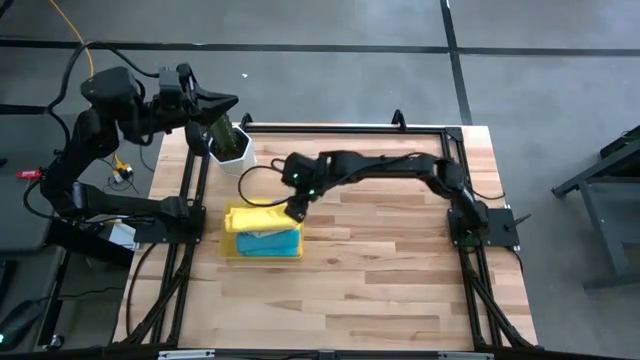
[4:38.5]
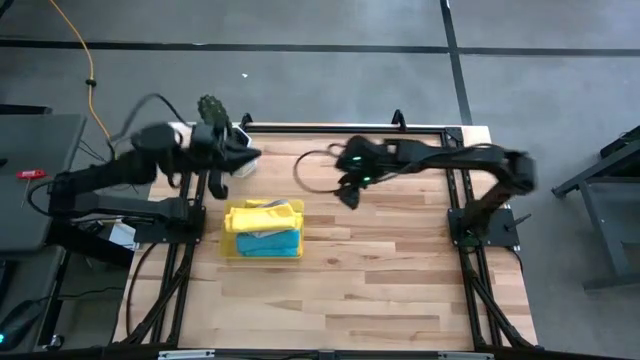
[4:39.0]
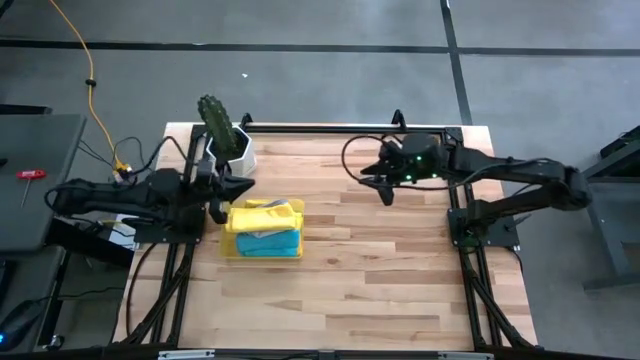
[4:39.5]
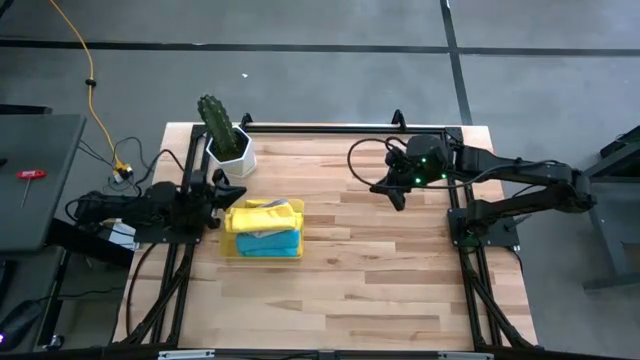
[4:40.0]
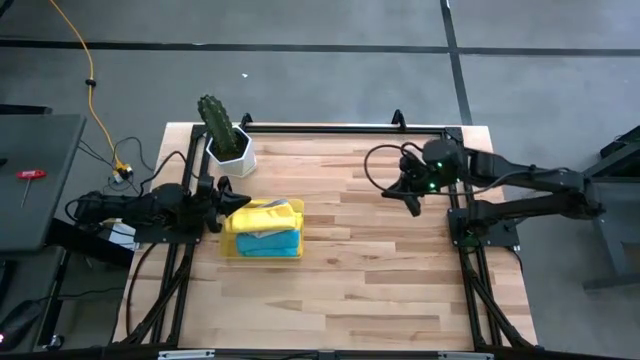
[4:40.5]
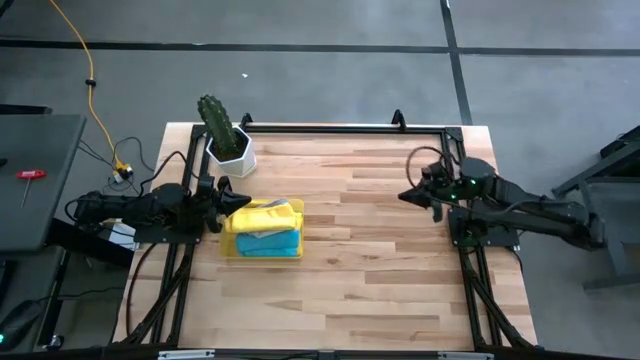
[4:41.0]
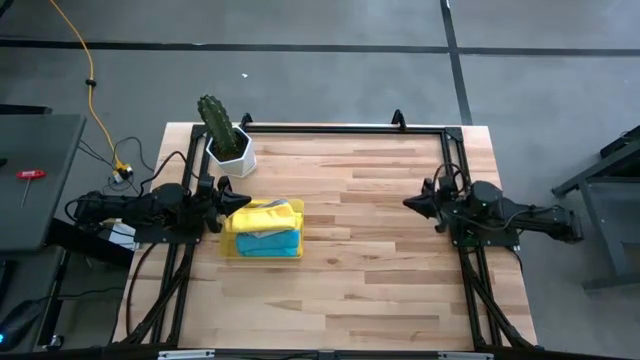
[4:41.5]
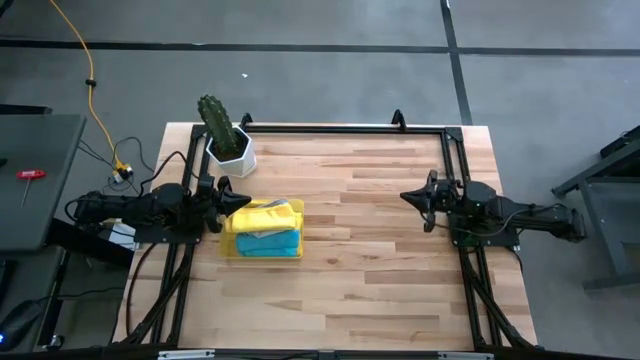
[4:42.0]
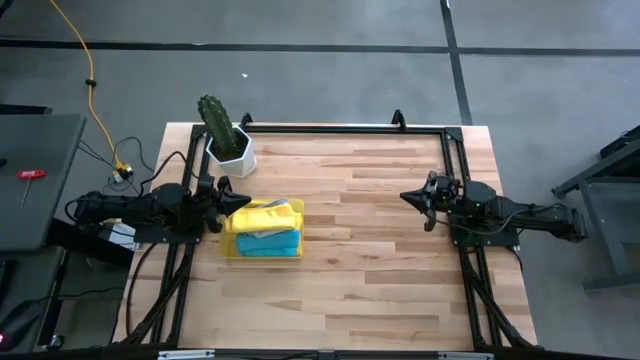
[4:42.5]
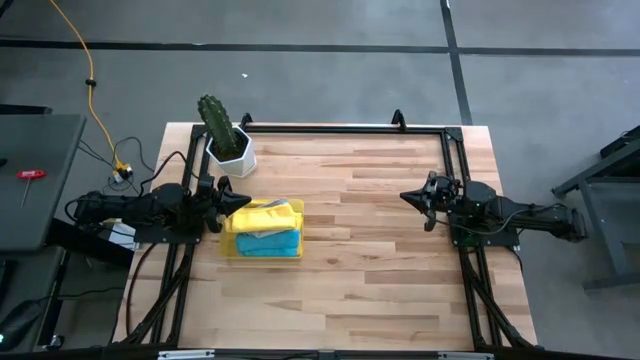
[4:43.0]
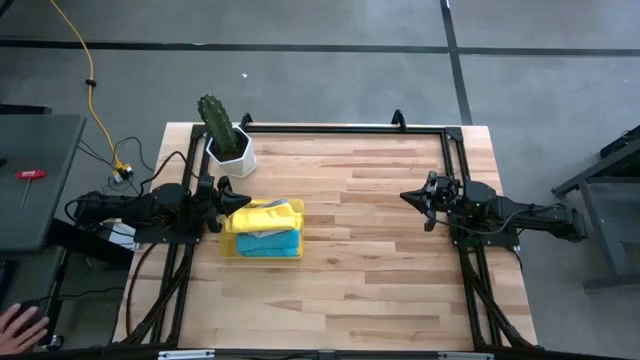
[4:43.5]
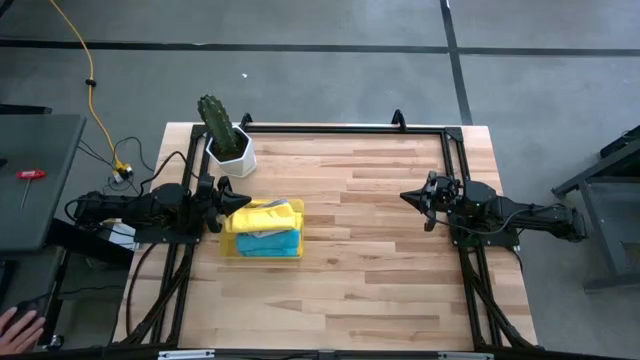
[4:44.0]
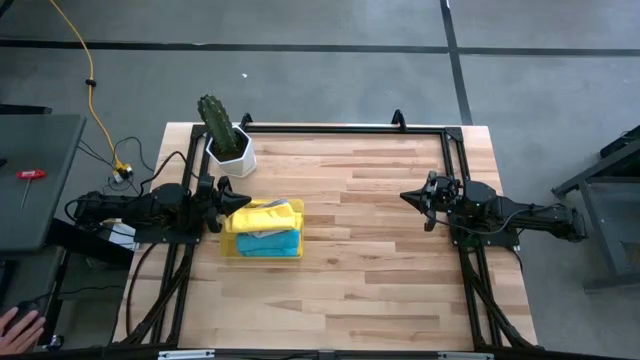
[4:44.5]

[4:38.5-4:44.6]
Task: Fold microfiber towels
Return To Home Position

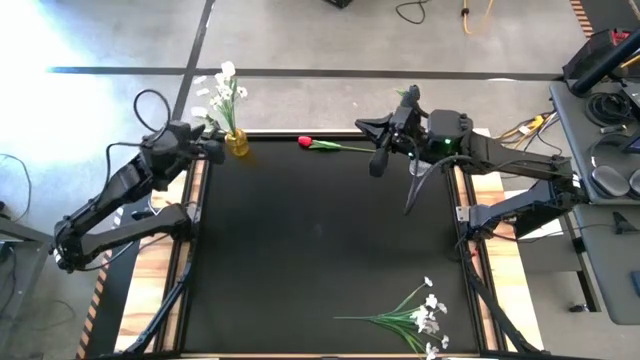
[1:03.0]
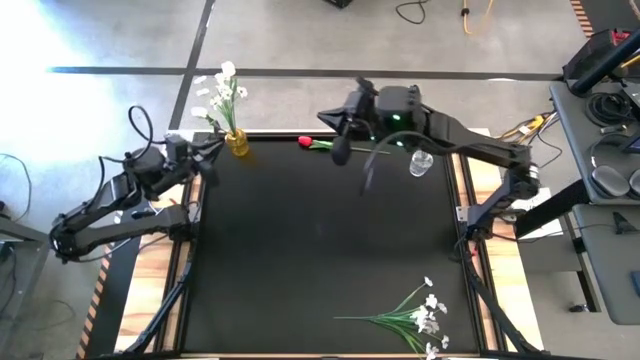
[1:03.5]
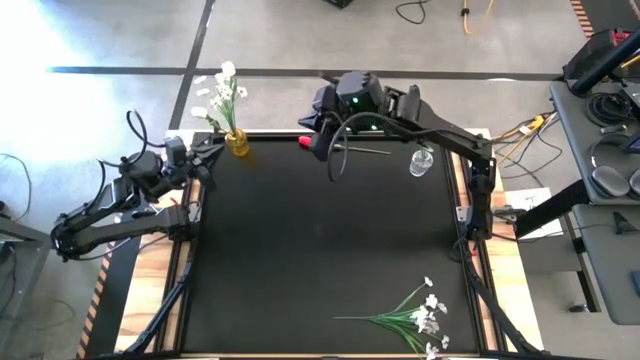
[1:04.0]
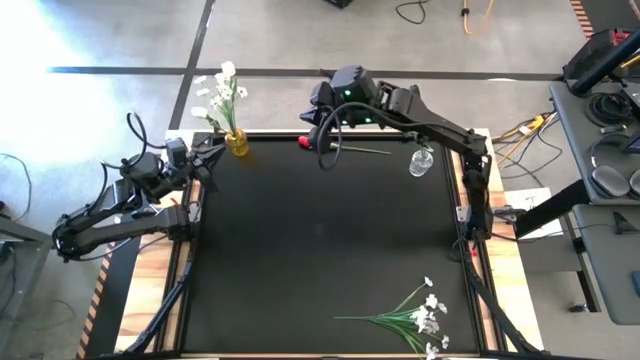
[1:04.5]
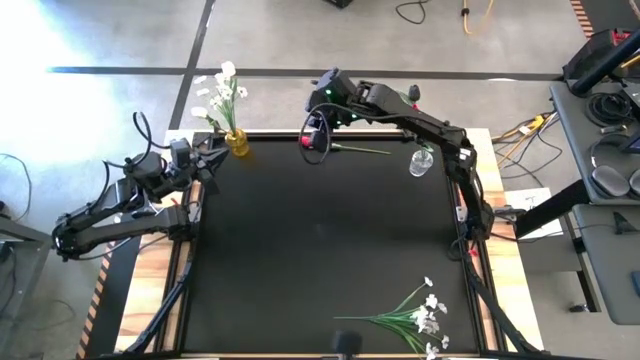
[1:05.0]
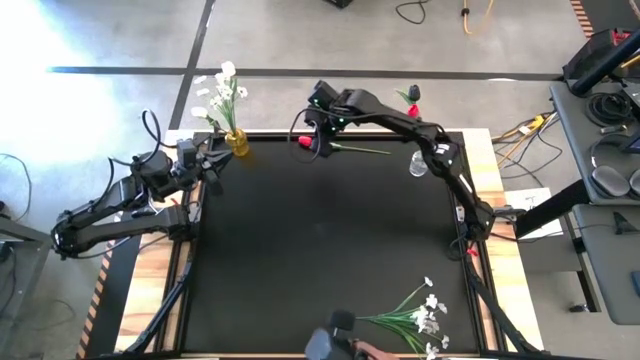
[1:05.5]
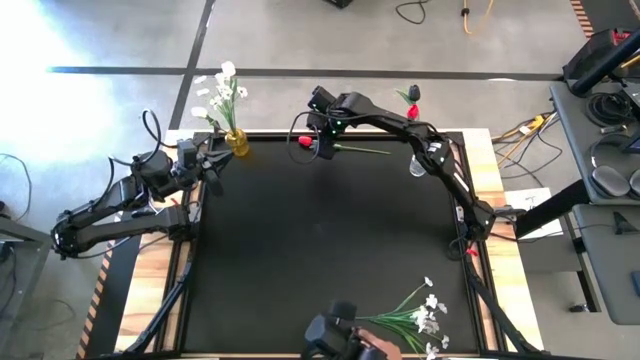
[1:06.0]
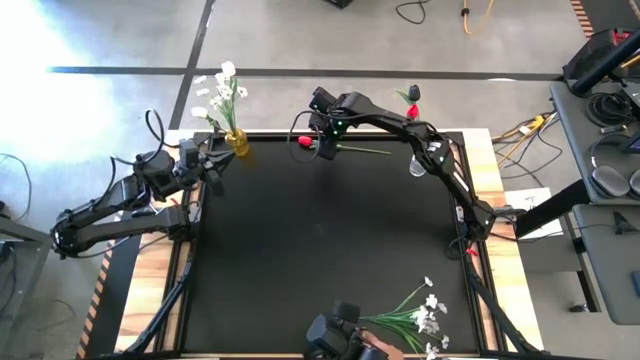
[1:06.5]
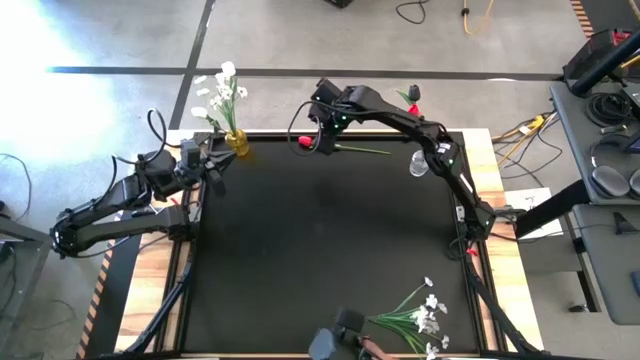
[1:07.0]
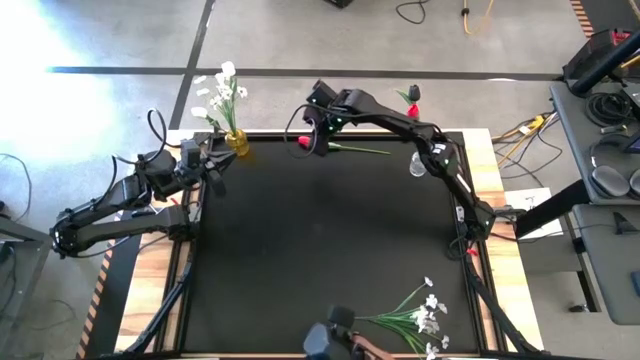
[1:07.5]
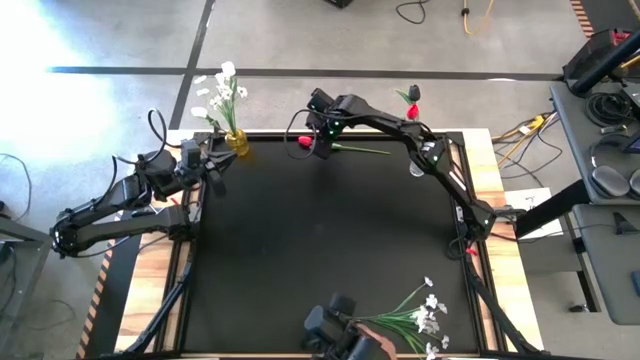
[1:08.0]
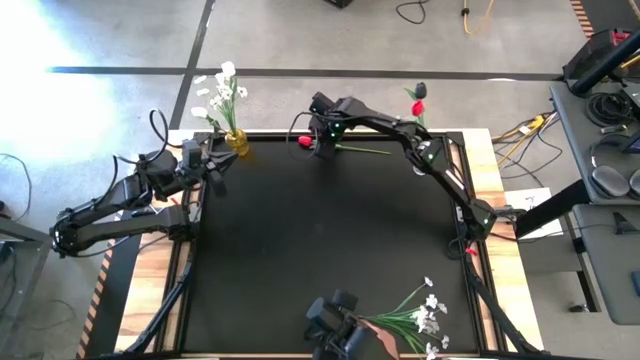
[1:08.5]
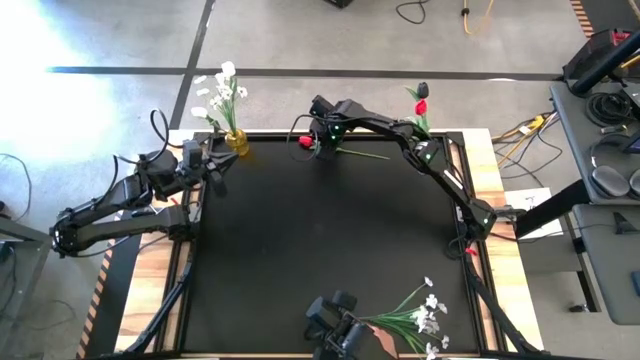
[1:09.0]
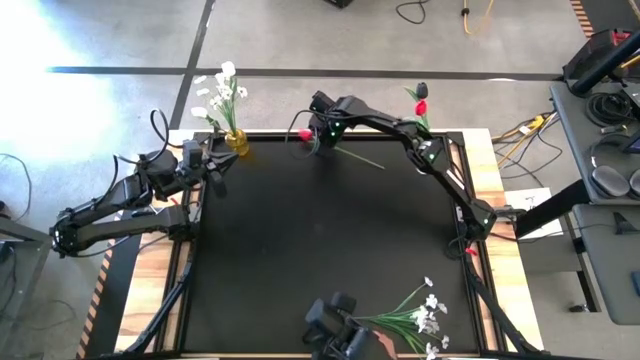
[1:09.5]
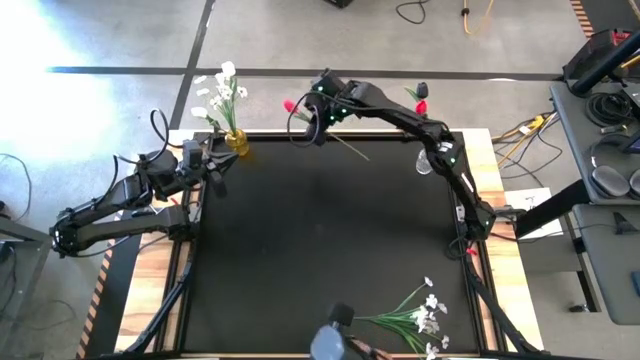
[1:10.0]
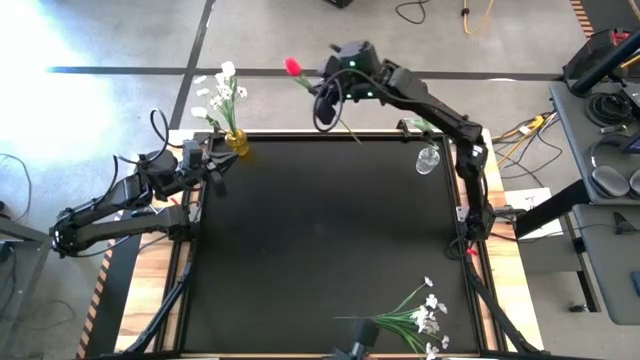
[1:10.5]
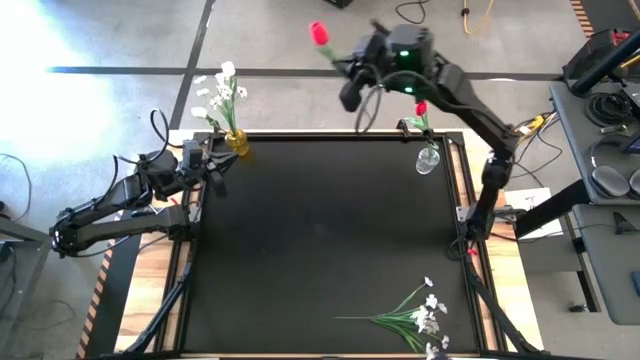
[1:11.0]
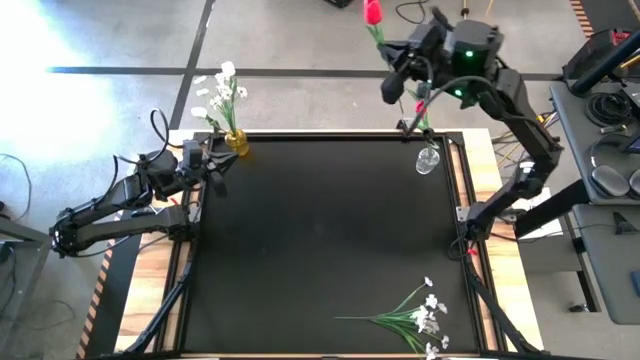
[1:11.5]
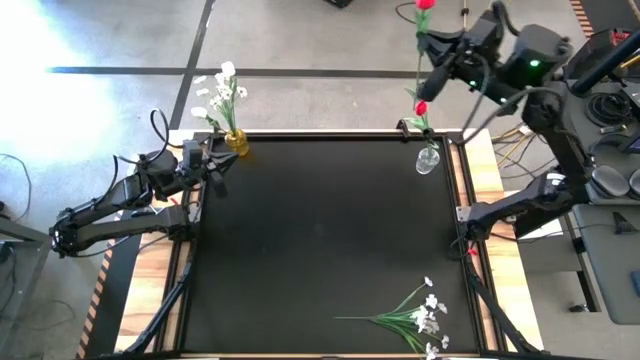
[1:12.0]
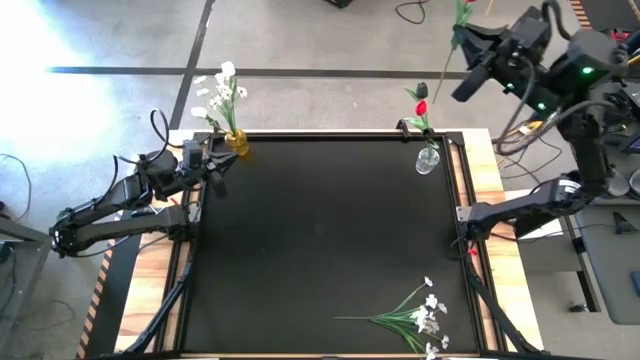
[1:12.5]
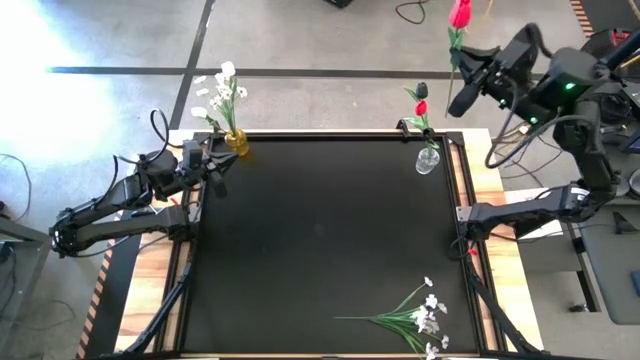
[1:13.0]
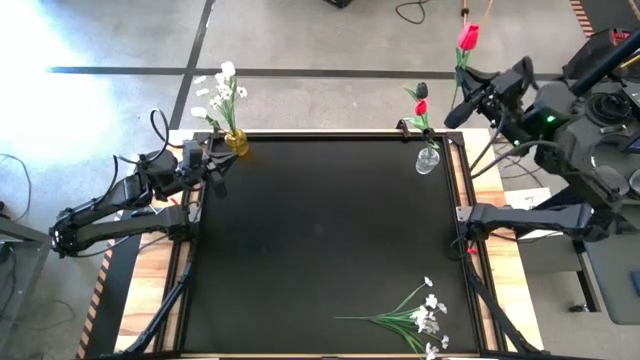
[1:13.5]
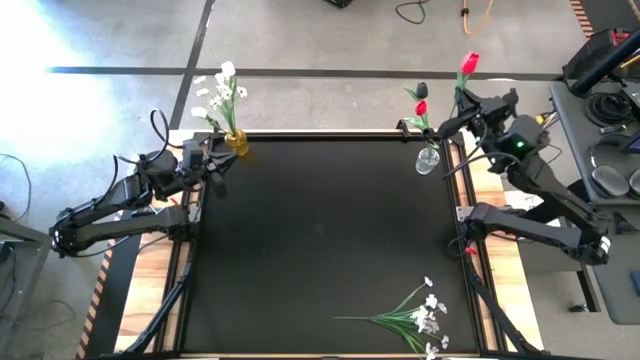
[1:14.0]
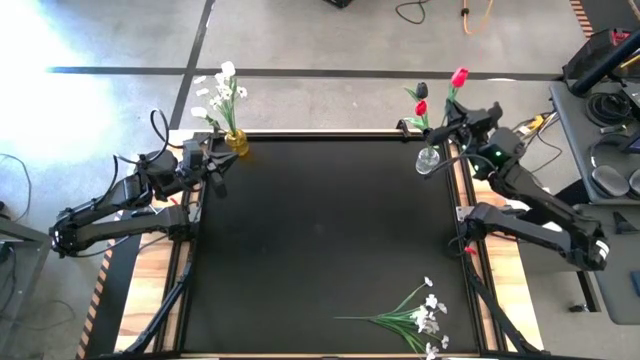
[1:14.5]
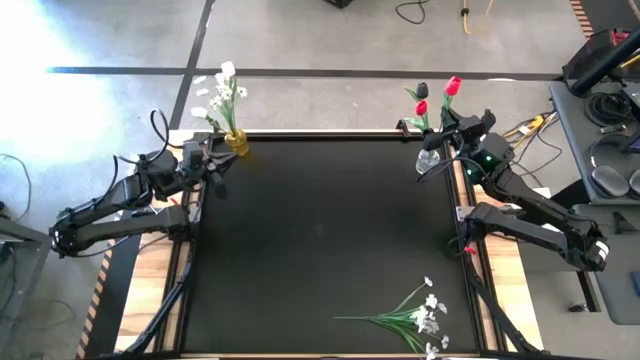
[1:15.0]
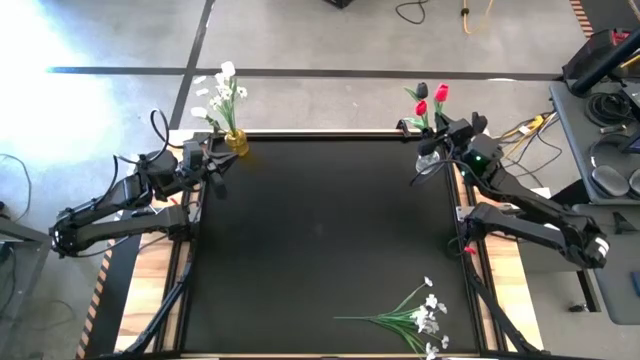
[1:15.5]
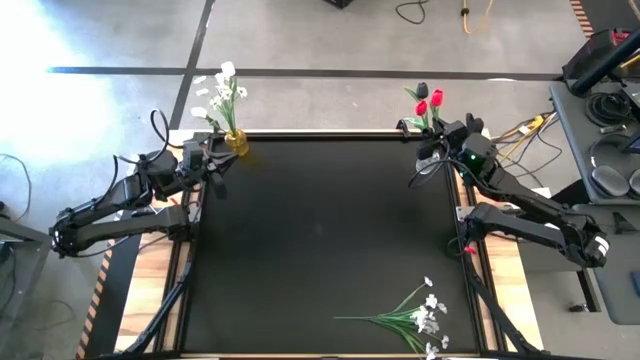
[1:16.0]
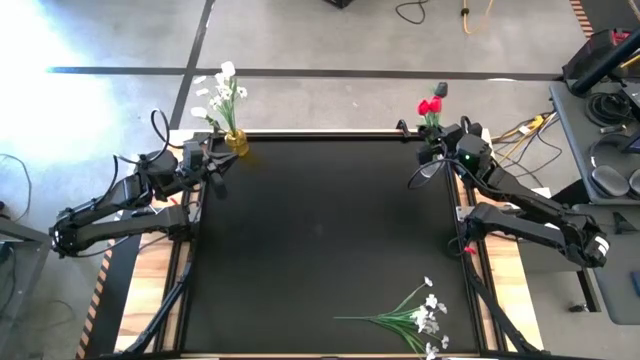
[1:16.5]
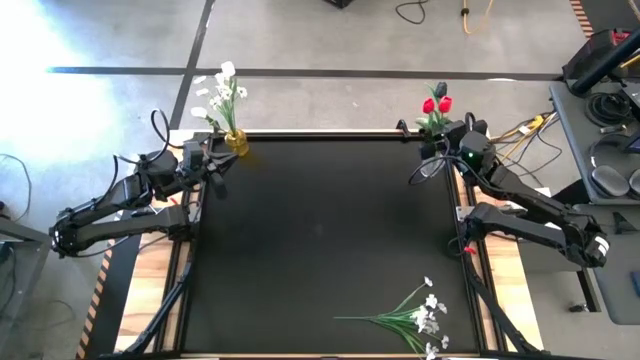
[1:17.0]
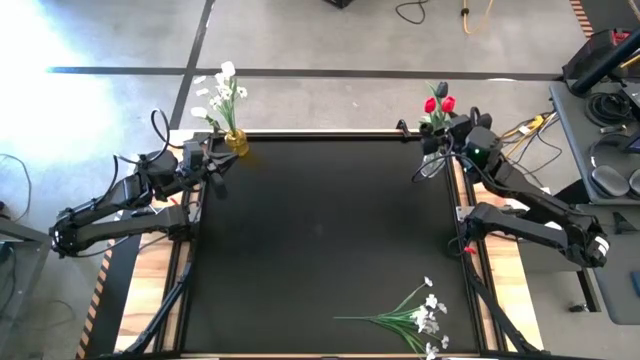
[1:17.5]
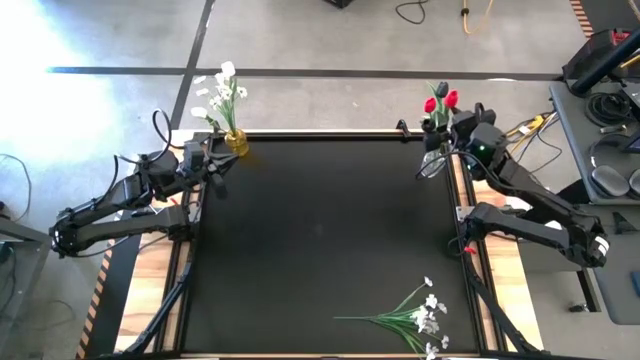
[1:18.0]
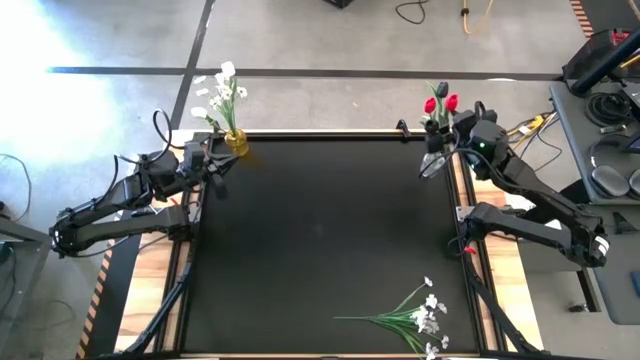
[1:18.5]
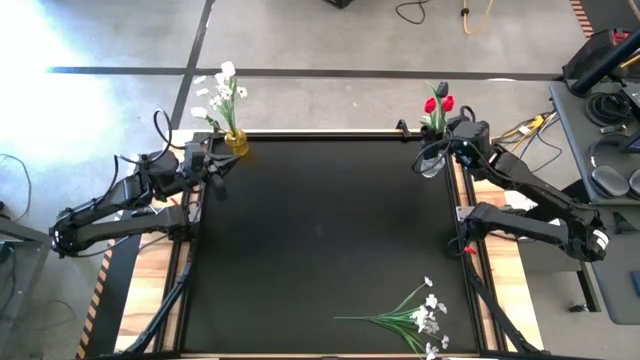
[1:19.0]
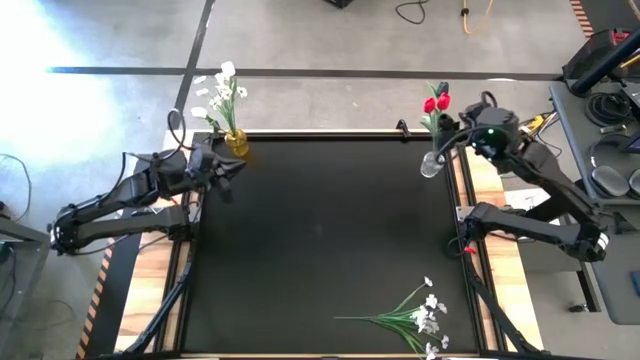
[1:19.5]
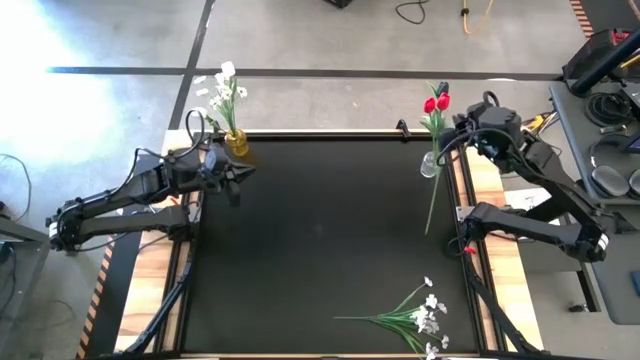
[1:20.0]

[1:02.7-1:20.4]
Task: Sort flowers into vase by color
Put the red tulip into the transparent vase
